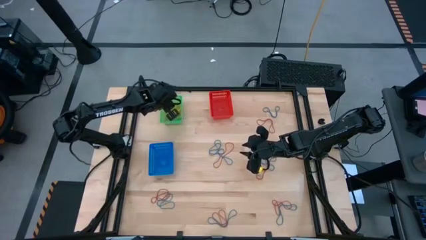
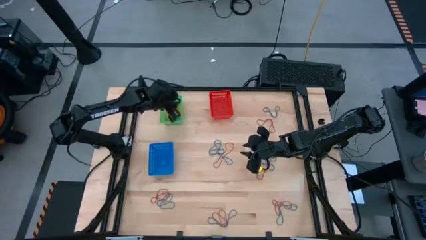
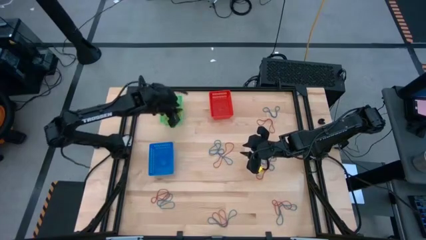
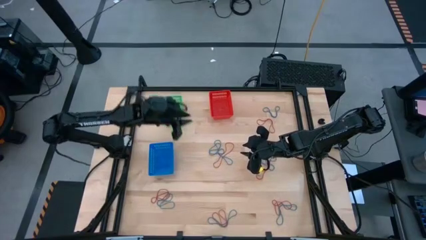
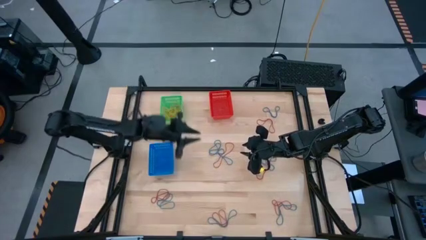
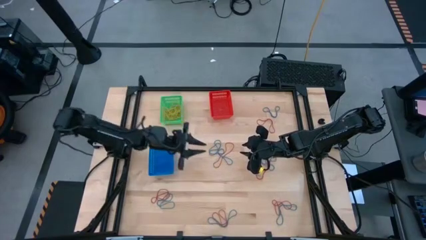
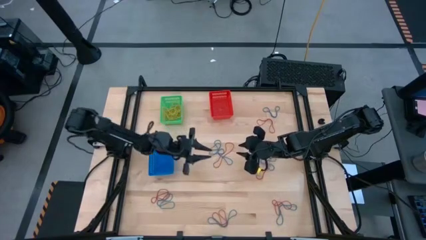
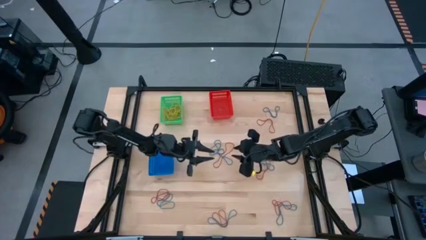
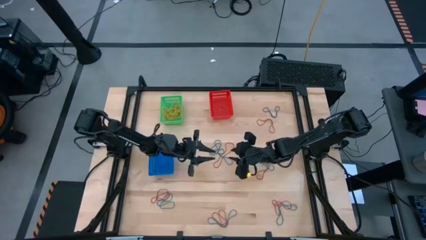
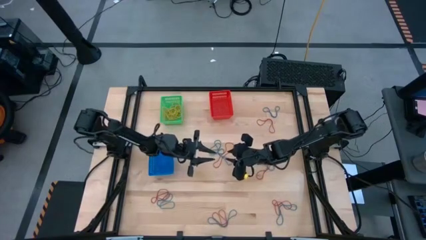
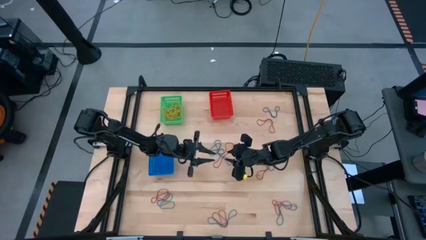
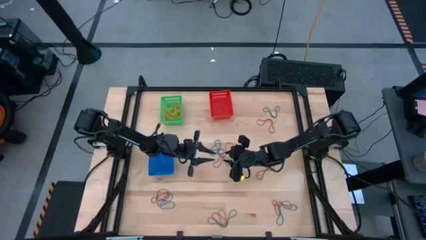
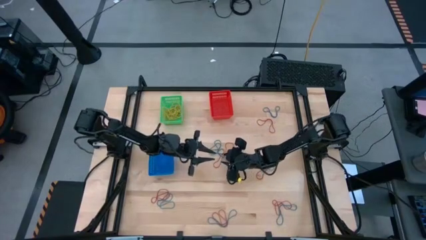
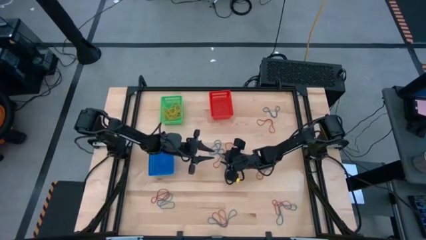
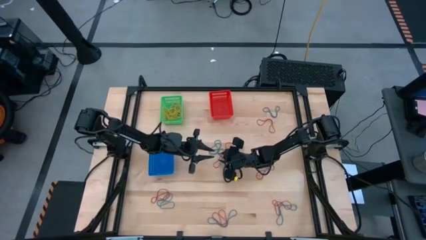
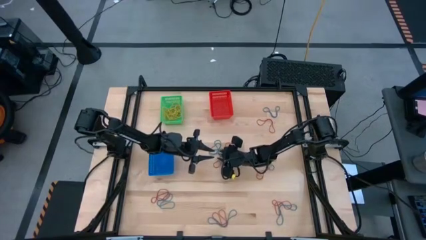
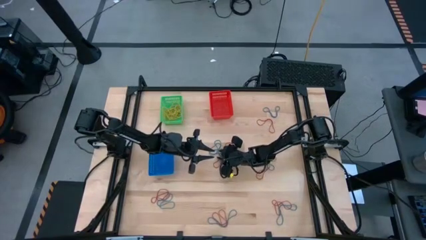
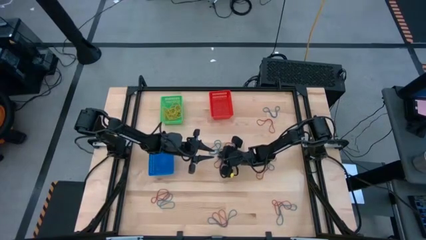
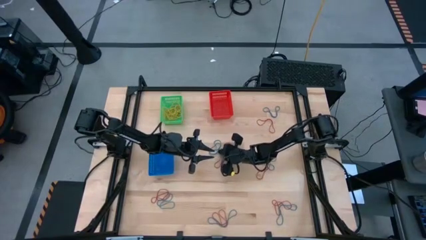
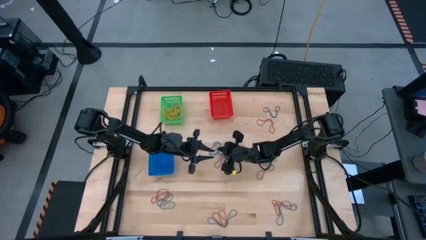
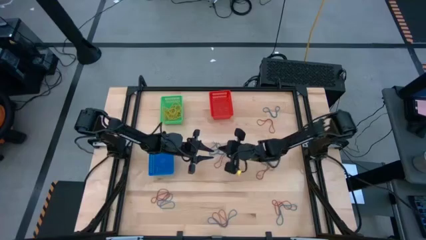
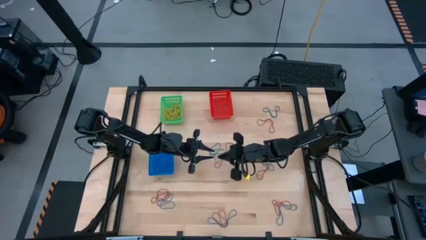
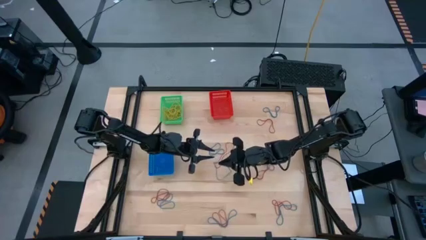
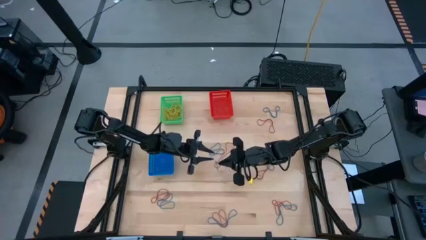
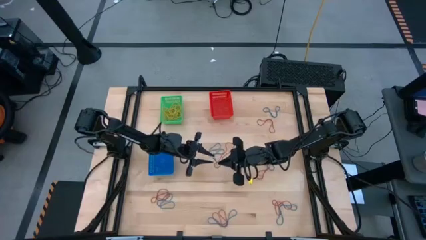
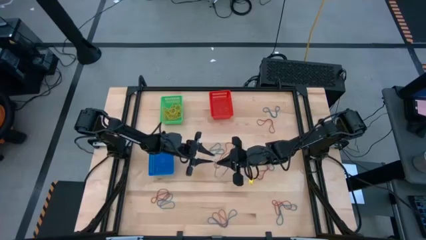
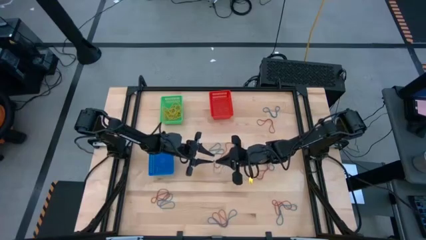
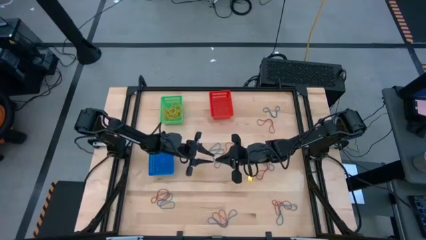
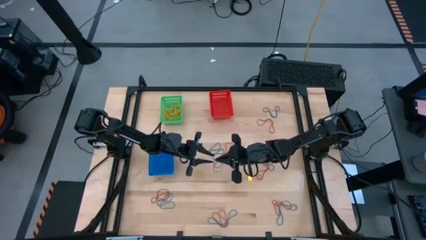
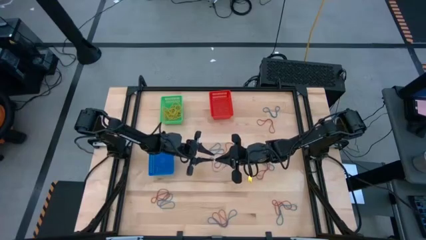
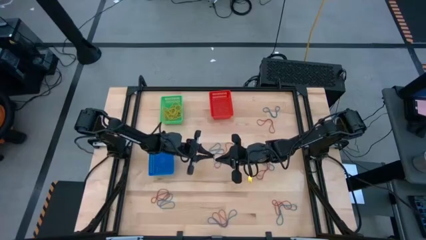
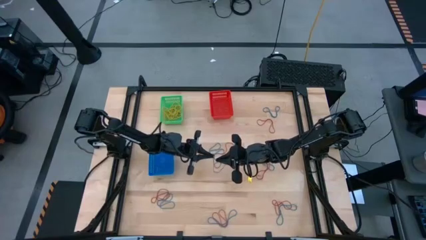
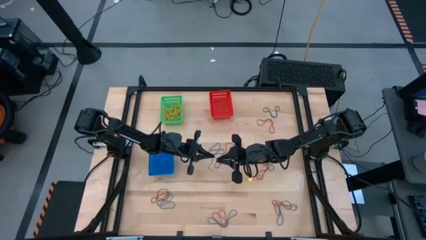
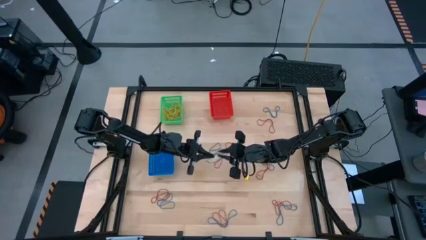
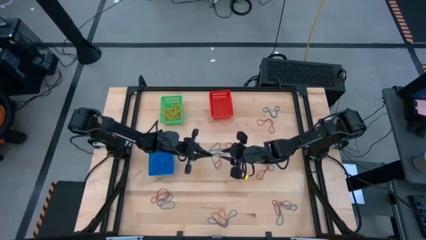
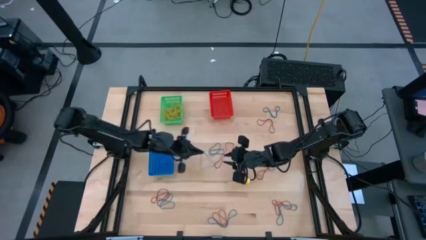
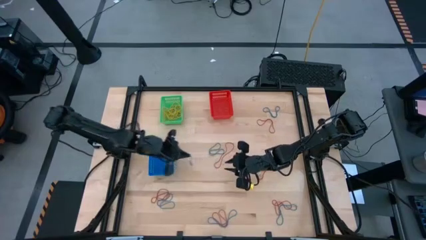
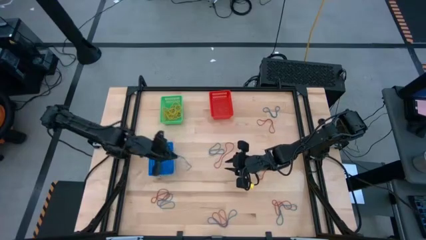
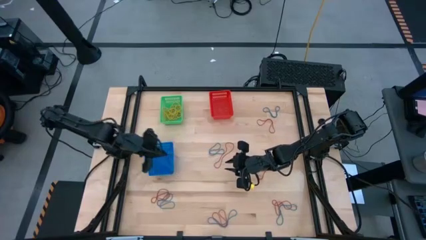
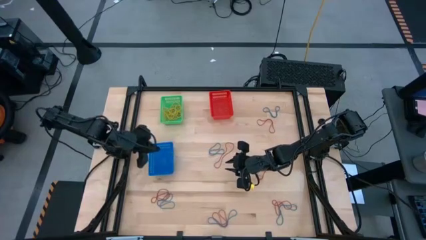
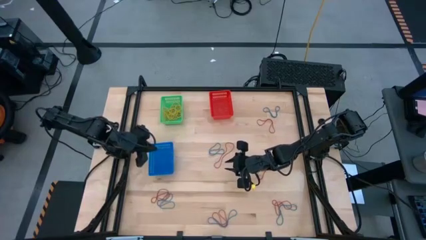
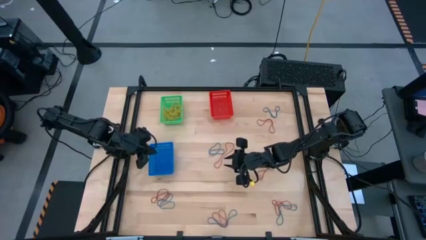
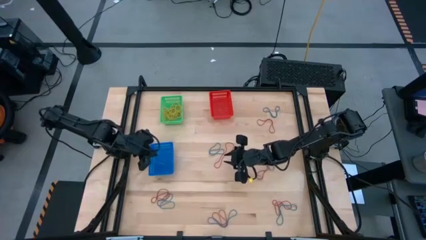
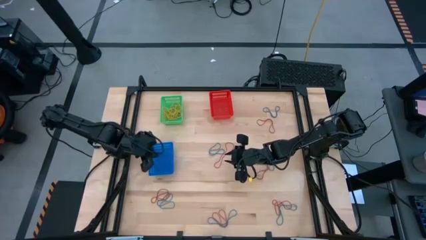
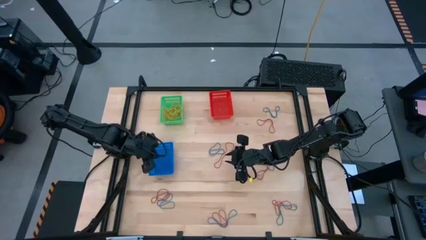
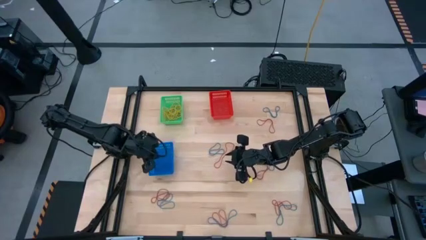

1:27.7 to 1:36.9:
Task: Sort rubber bands into baskets
Put the blue rubber band into the blue bin

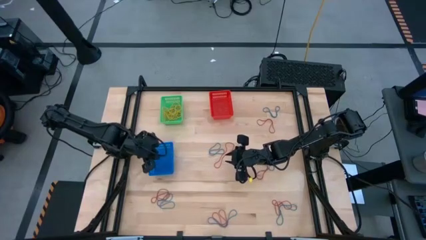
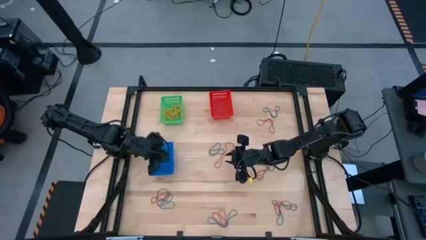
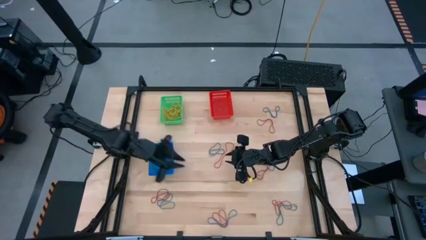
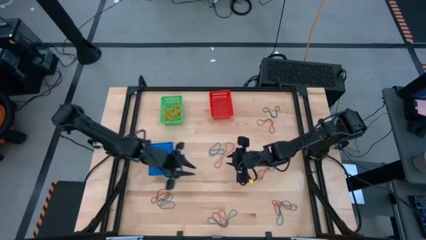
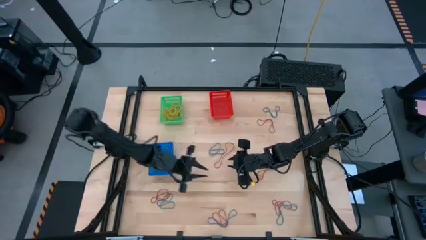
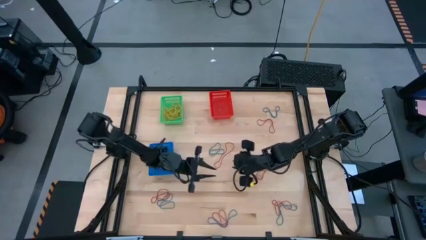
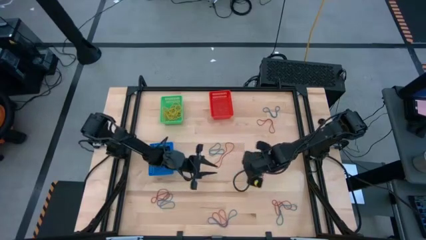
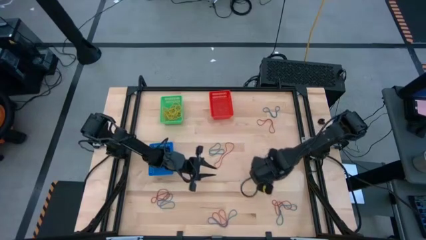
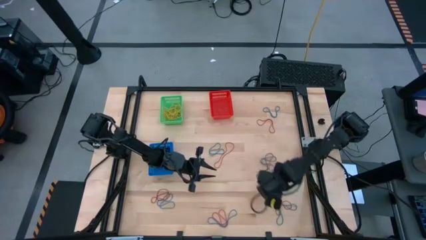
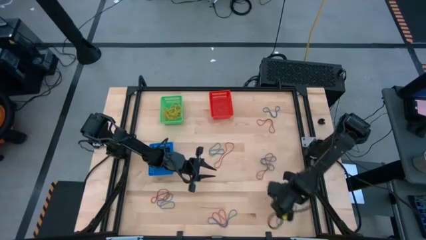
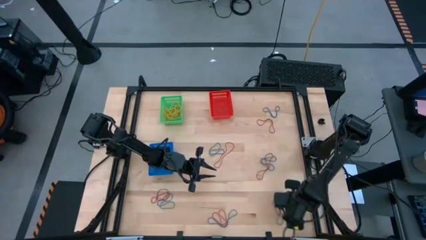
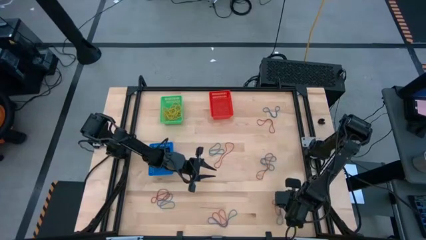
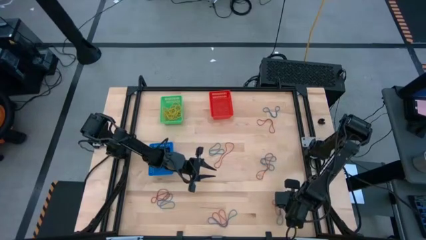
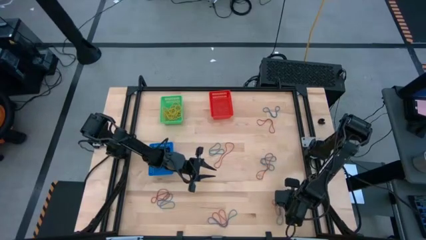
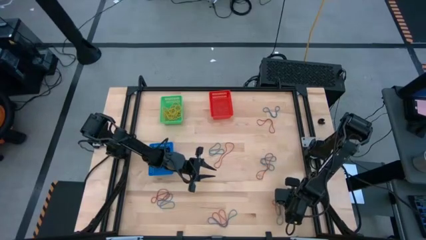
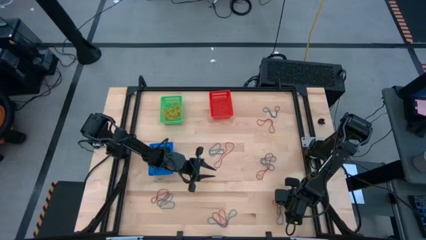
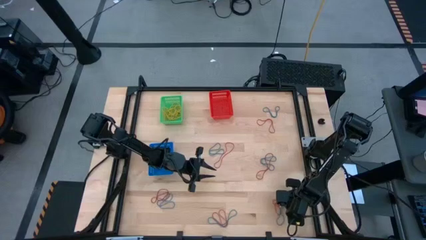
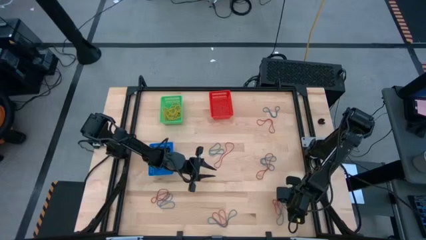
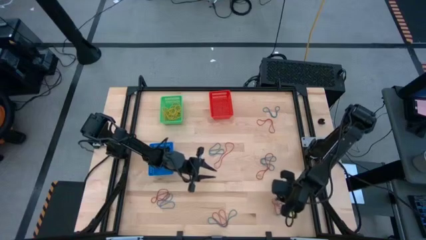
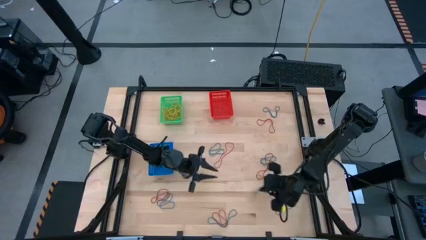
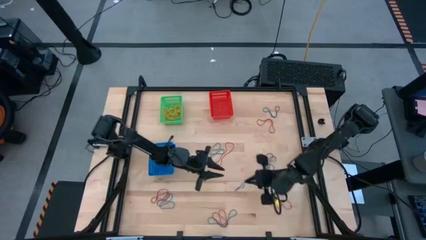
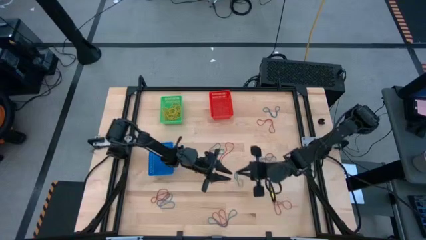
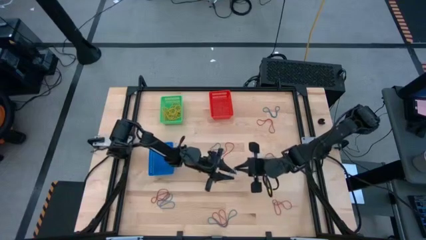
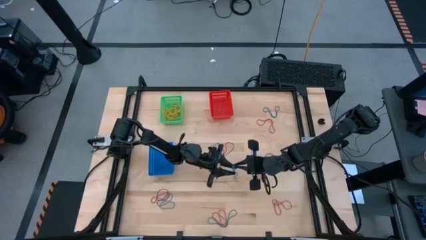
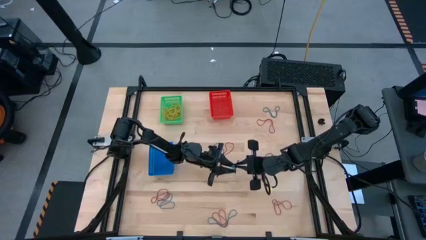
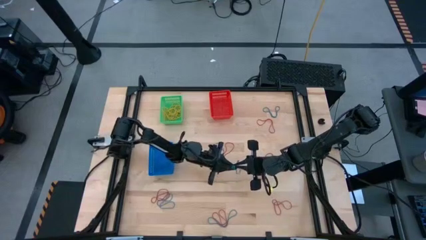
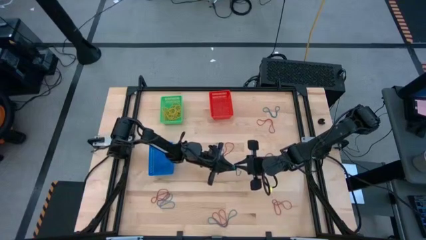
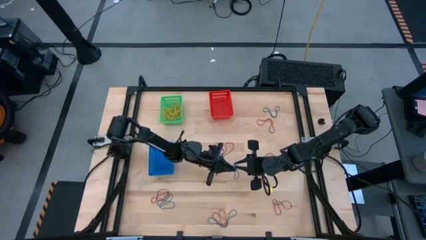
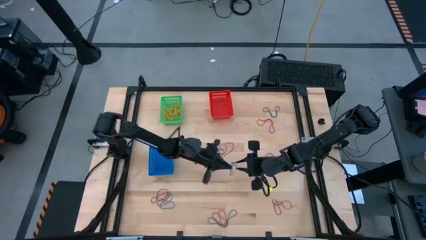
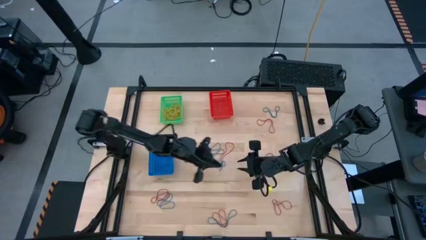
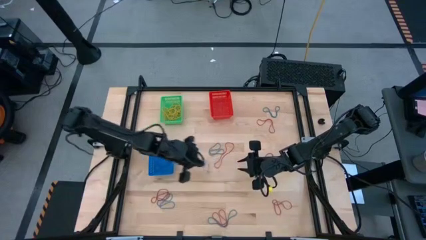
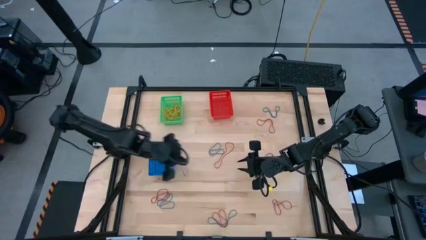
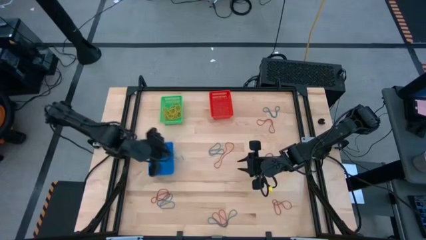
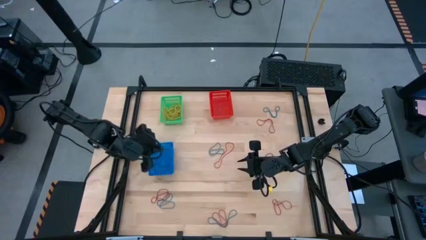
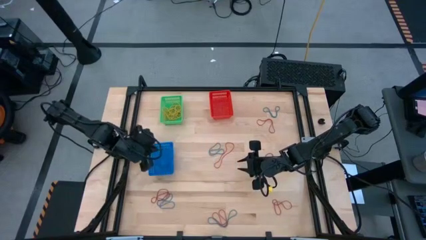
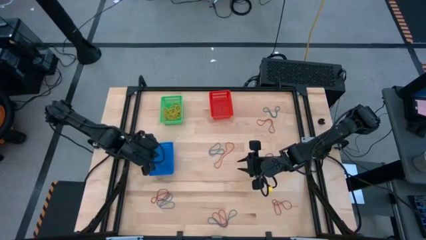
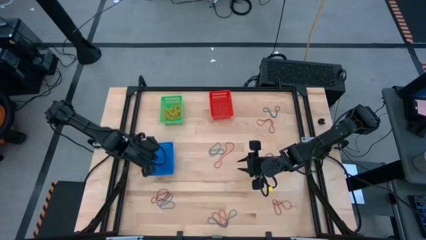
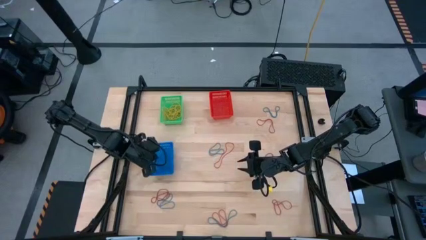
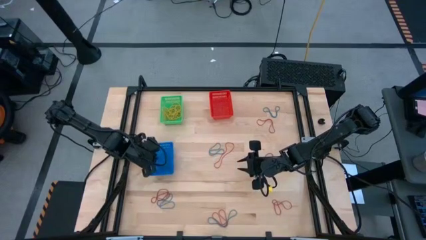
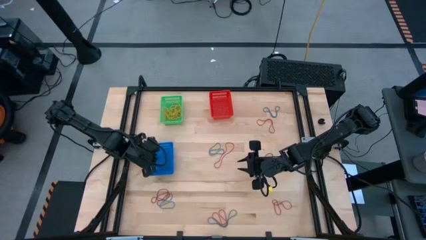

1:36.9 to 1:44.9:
Put the blue rubber band into the blue bin
